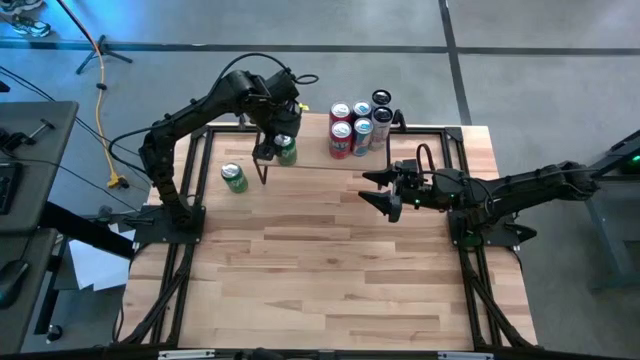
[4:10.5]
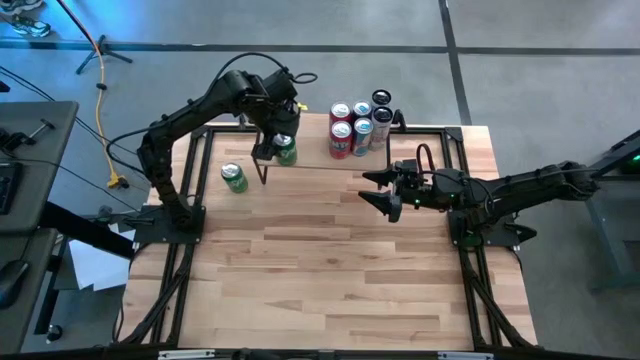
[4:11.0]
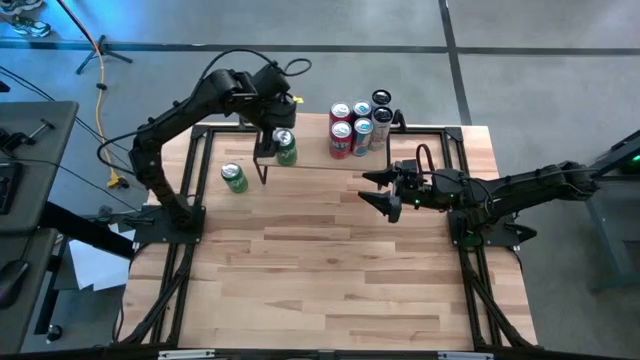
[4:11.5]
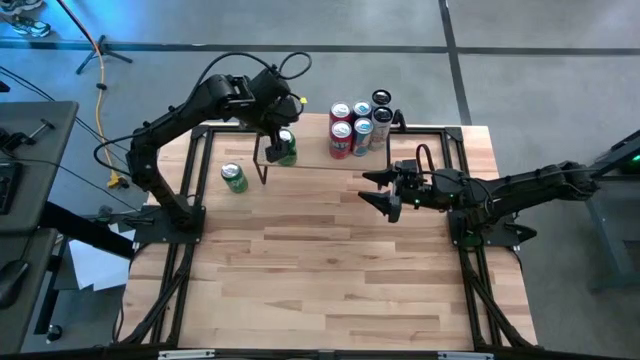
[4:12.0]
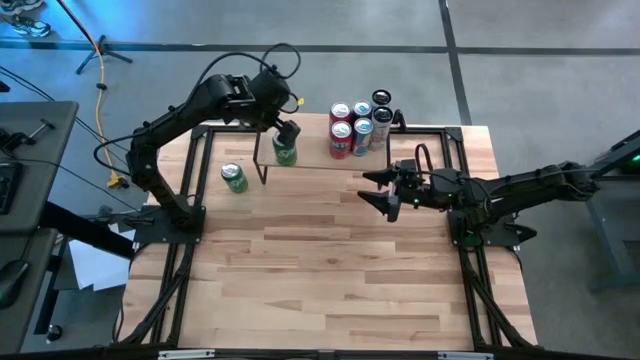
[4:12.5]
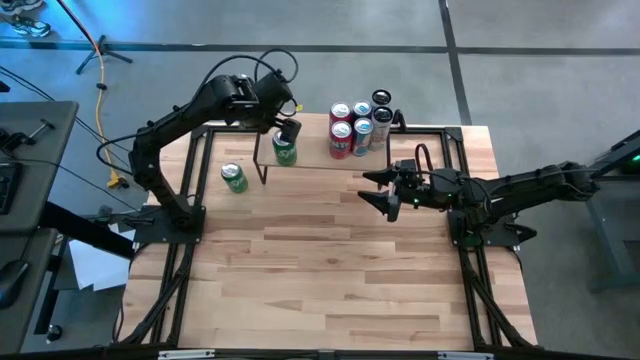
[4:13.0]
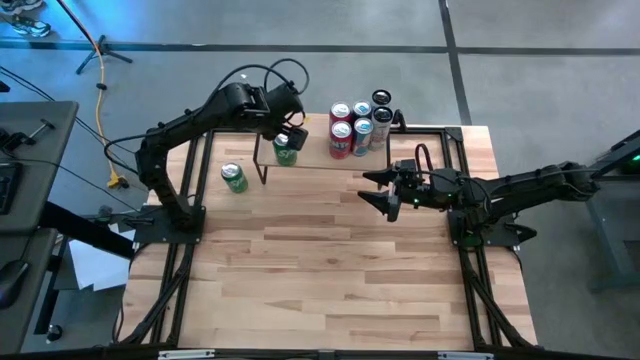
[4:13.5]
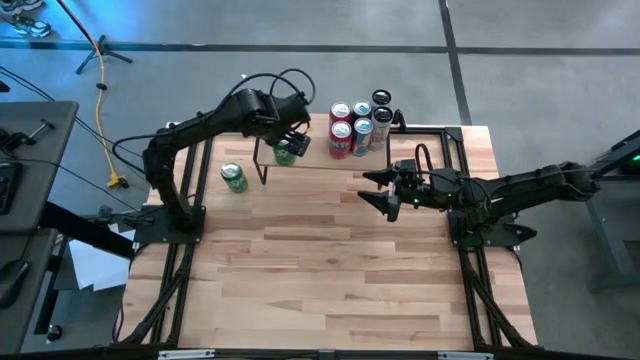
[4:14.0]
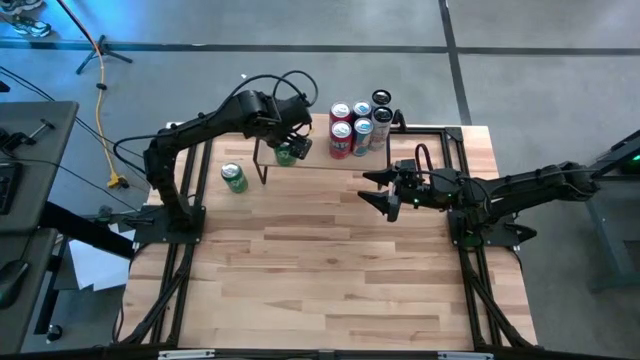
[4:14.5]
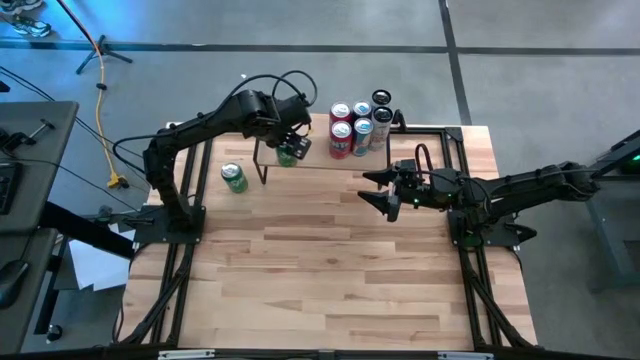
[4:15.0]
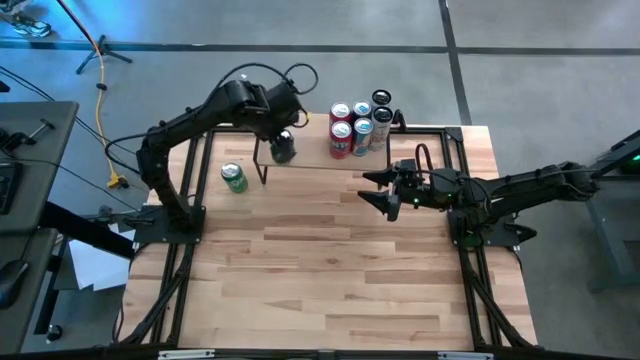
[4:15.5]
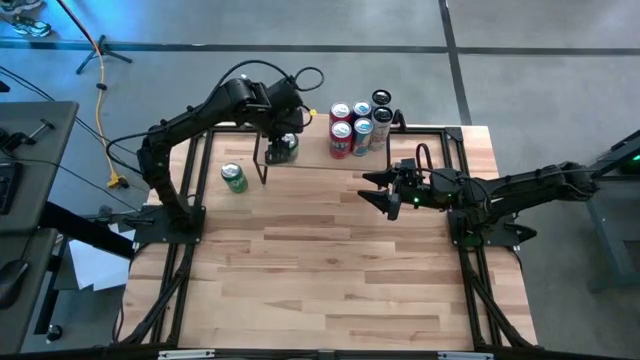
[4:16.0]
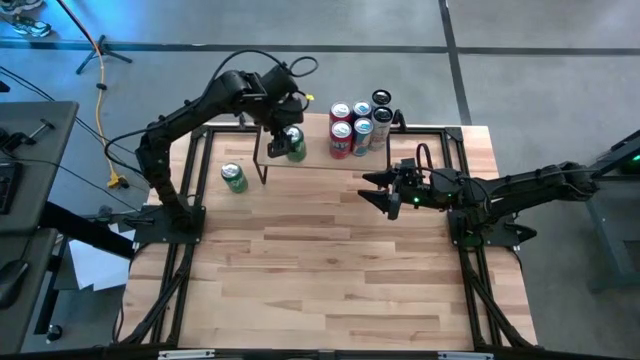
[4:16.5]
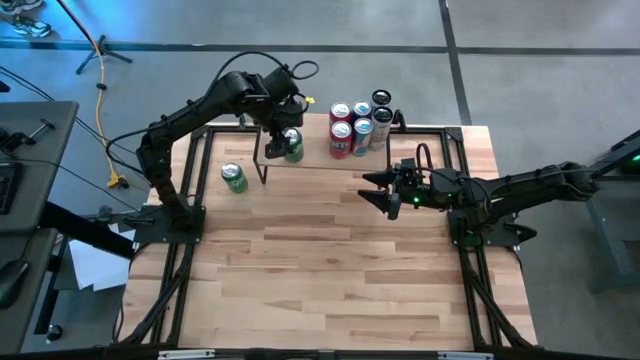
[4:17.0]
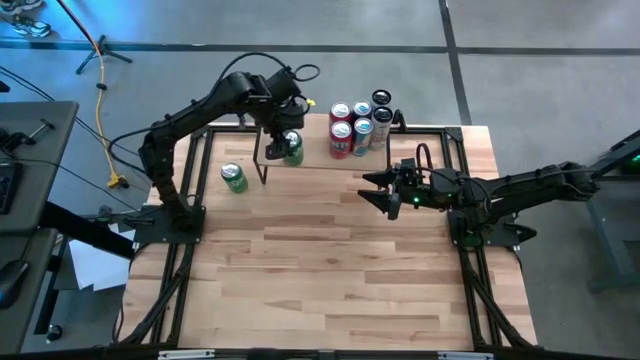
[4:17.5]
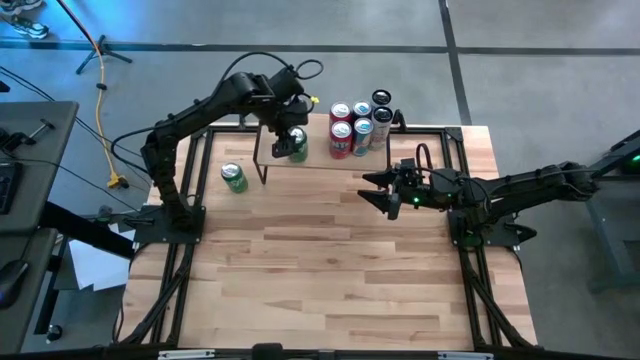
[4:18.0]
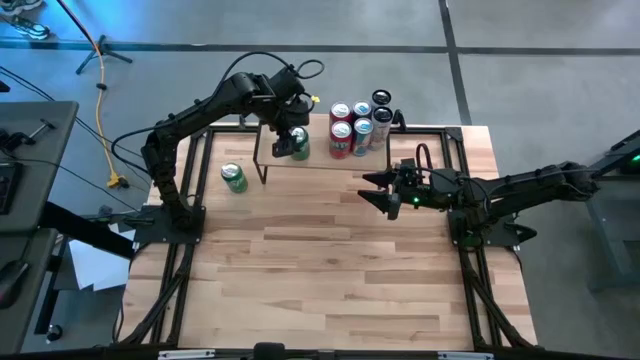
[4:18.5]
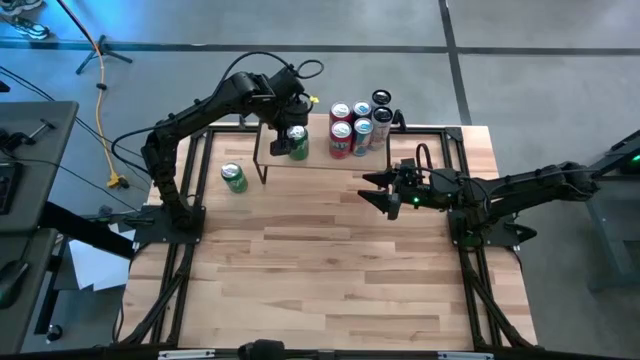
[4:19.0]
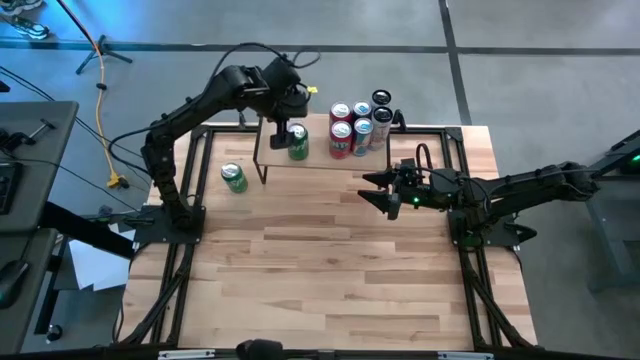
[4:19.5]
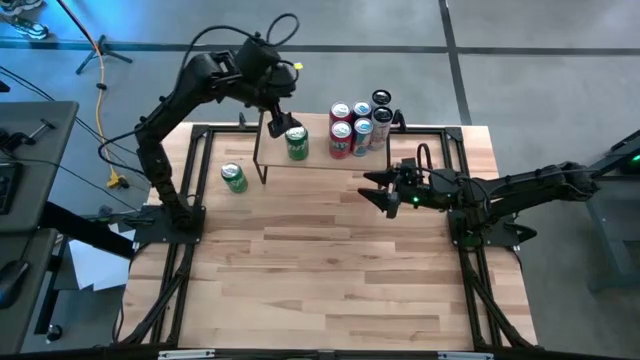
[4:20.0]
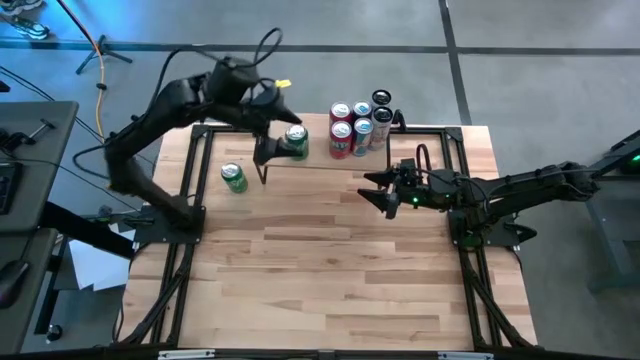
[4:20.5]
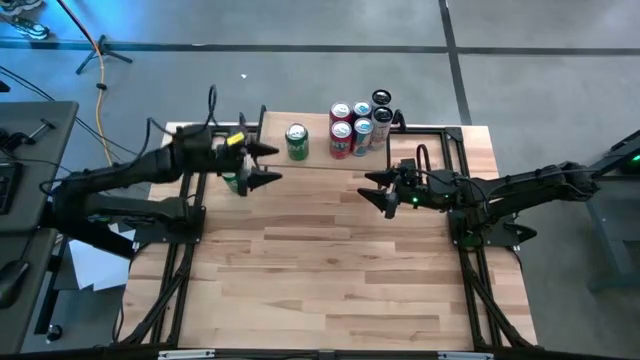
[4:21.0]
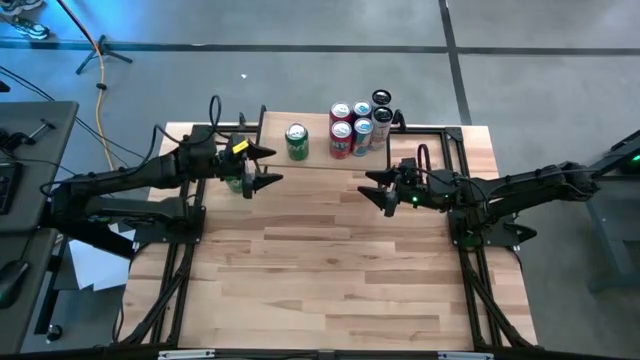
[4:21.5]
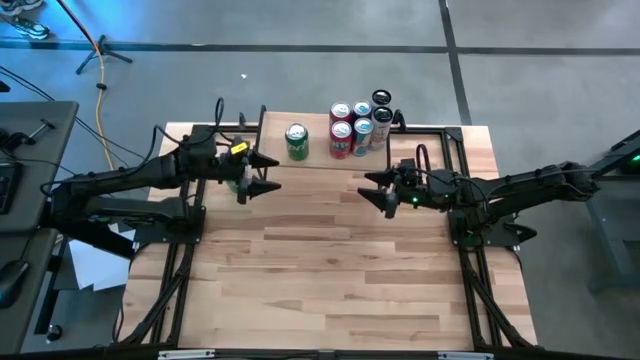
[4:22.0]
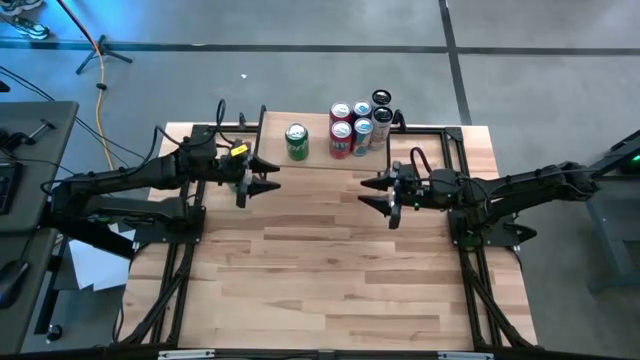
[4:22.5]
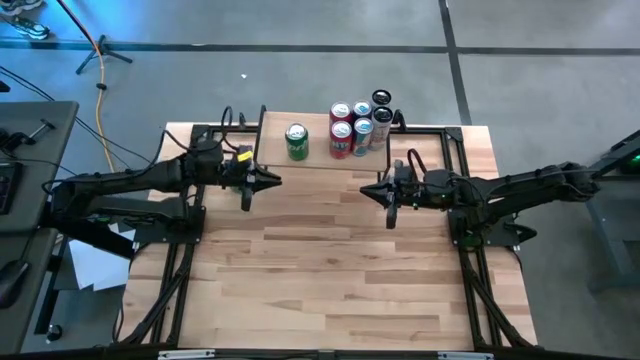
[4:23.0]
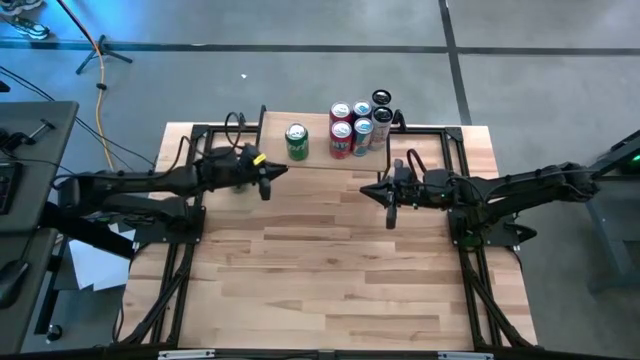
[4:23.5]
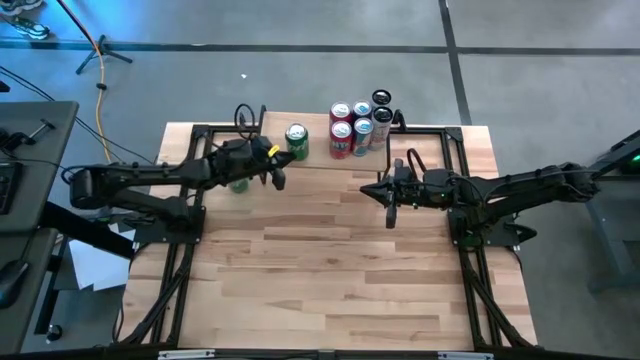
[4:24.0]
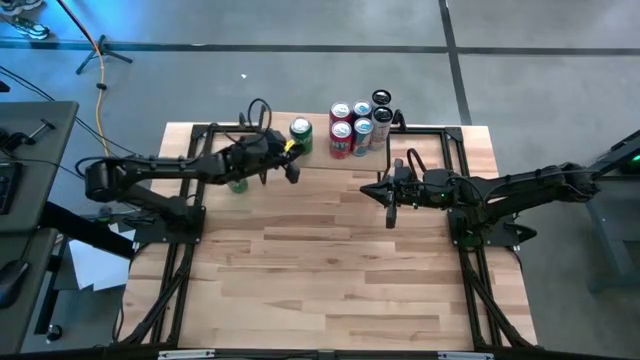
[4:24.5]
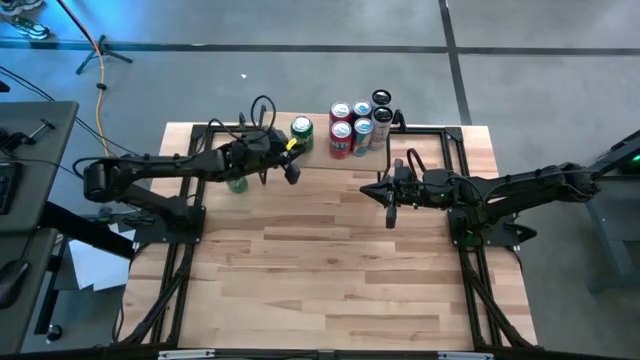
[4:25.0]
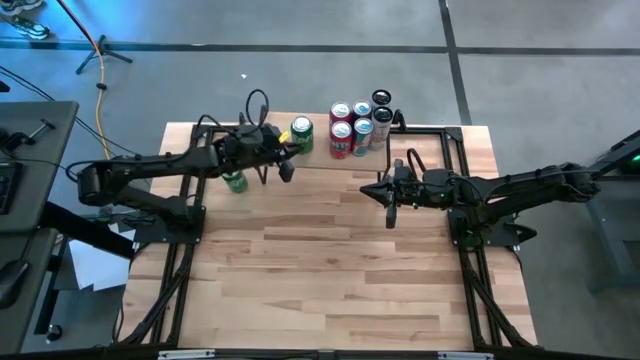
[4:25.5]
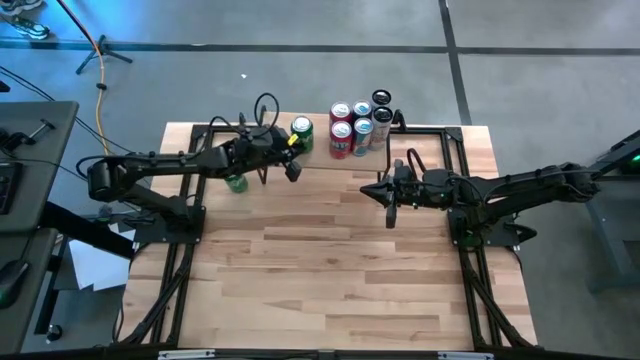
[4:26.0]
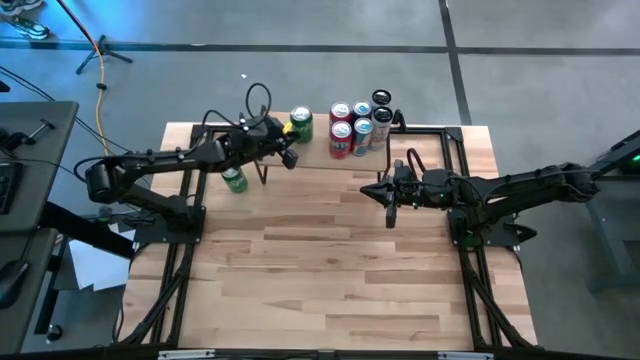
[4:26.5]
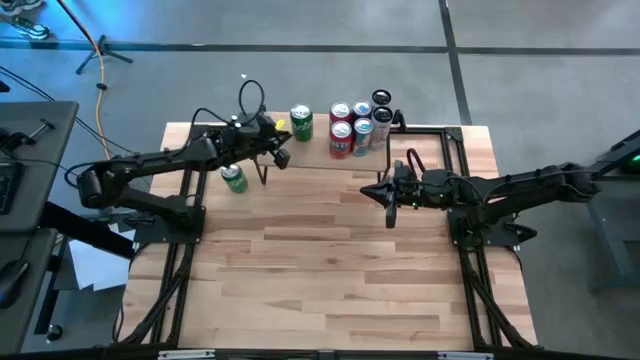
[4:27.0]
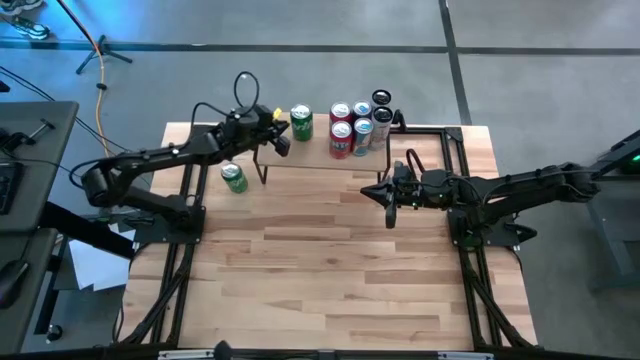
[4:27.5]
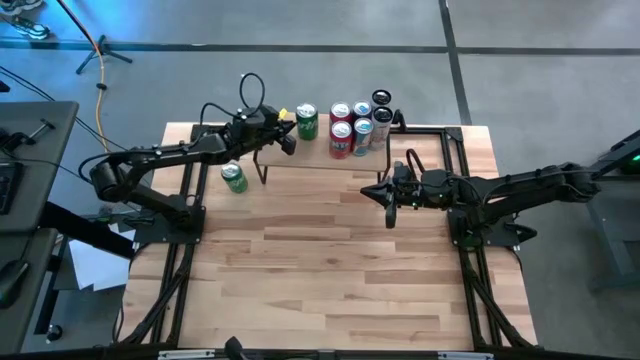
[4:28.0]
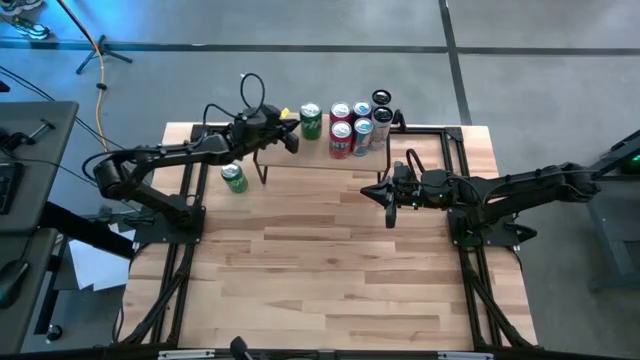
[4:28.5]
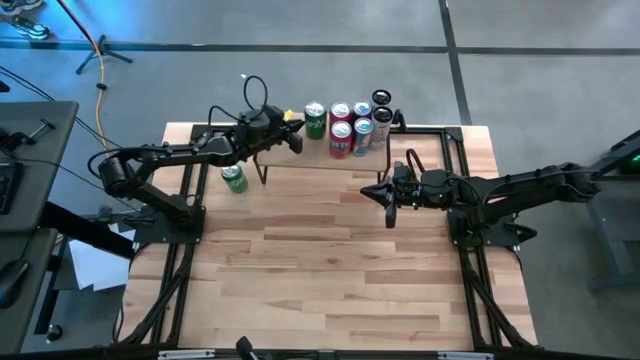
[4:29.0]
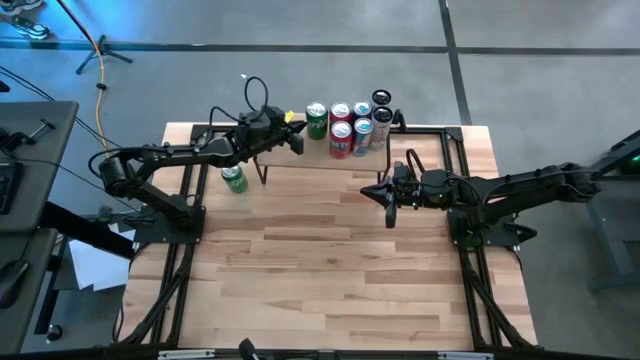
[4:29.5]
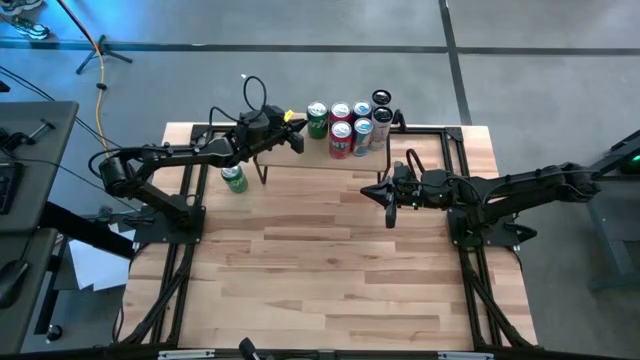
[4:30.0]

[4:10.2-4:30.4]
Task: Place canned beverage on shelf
Put the bottom green soda can on the shelf
